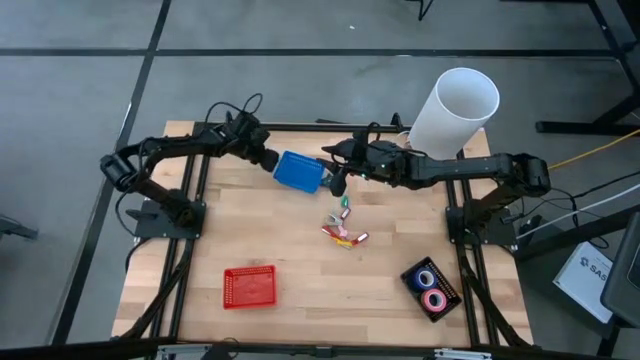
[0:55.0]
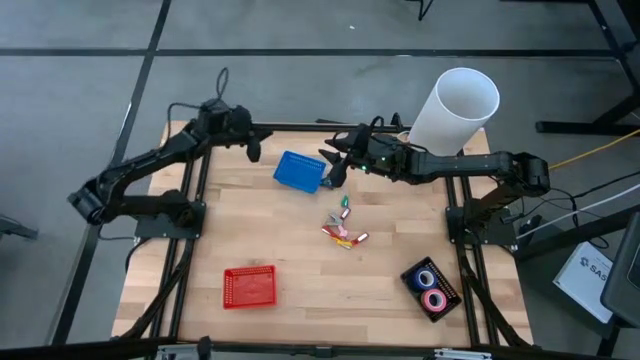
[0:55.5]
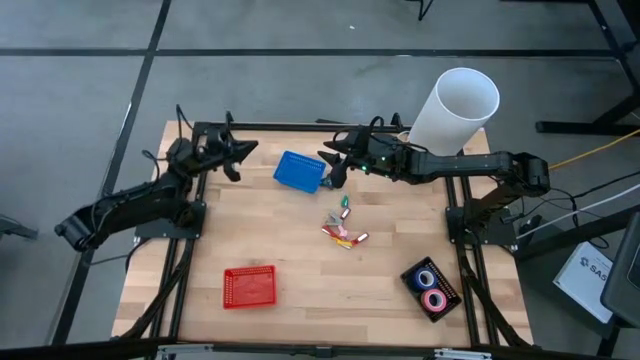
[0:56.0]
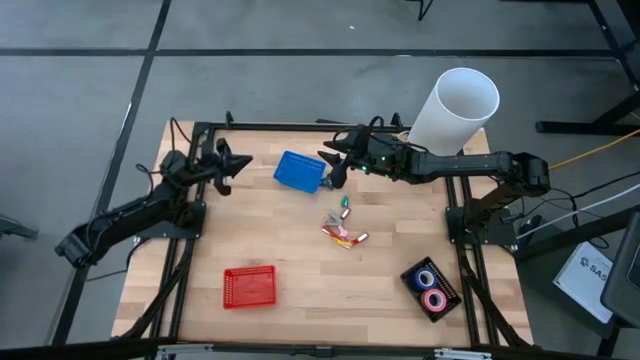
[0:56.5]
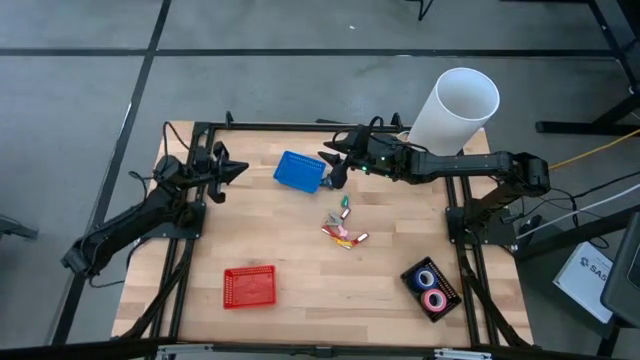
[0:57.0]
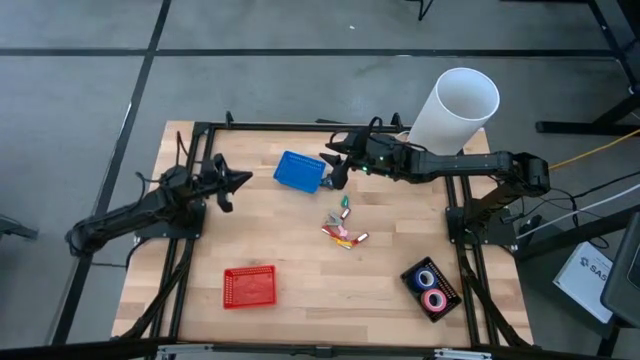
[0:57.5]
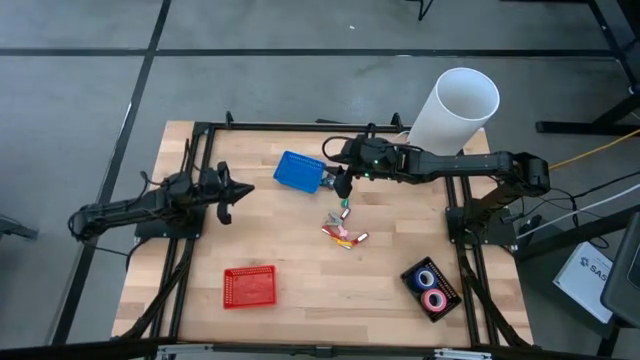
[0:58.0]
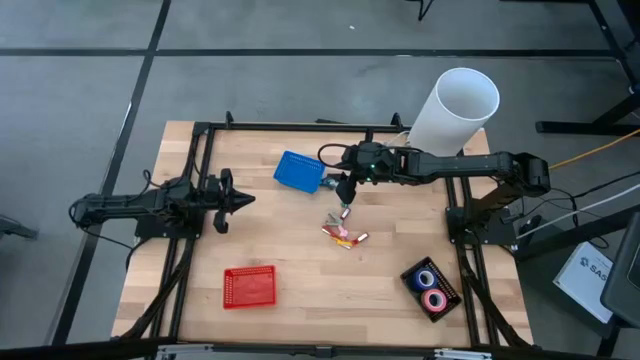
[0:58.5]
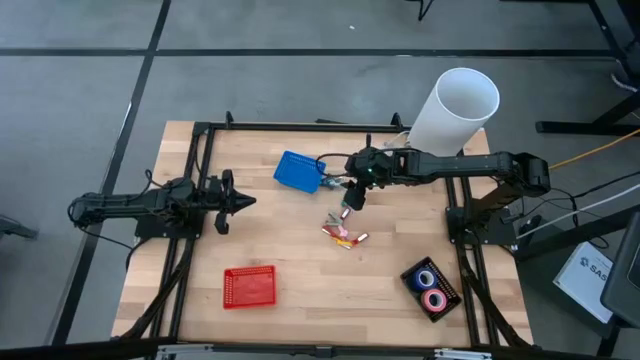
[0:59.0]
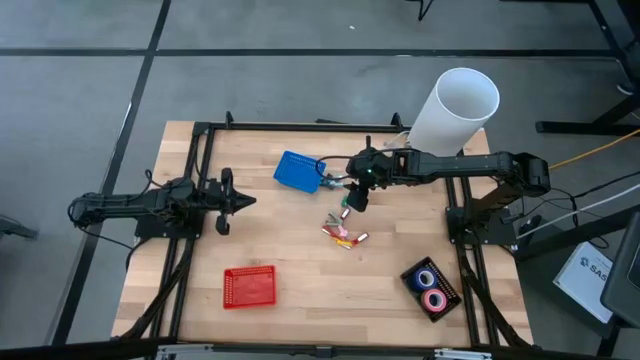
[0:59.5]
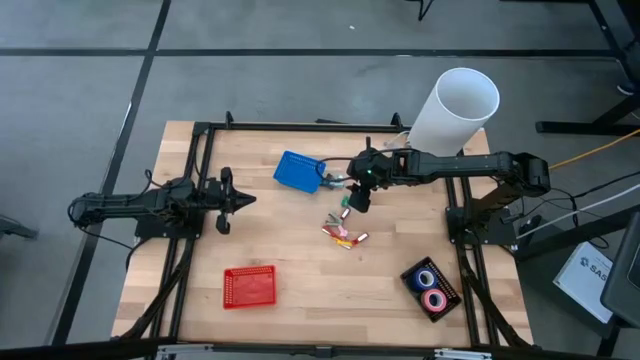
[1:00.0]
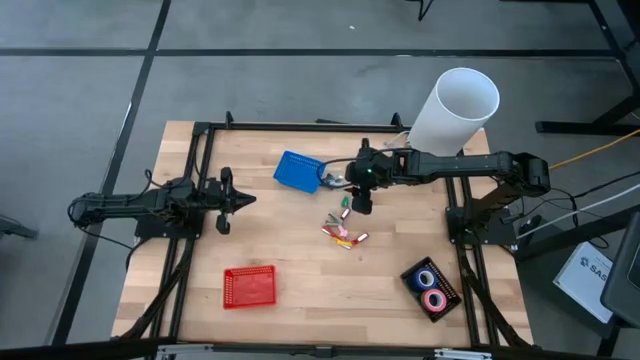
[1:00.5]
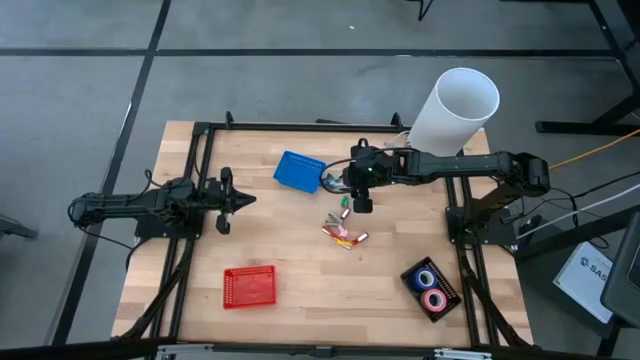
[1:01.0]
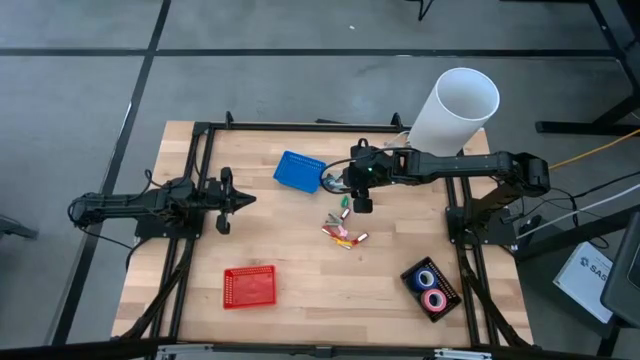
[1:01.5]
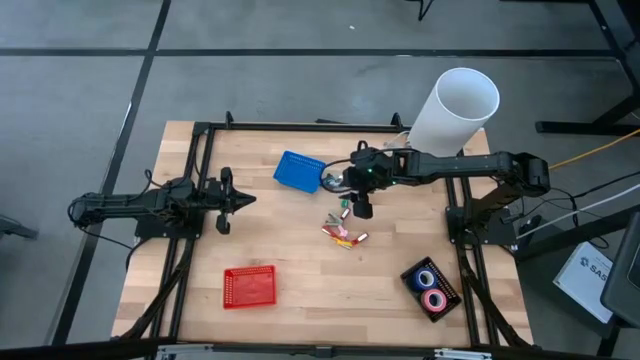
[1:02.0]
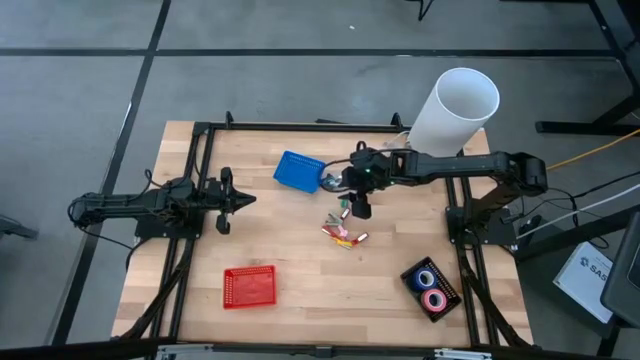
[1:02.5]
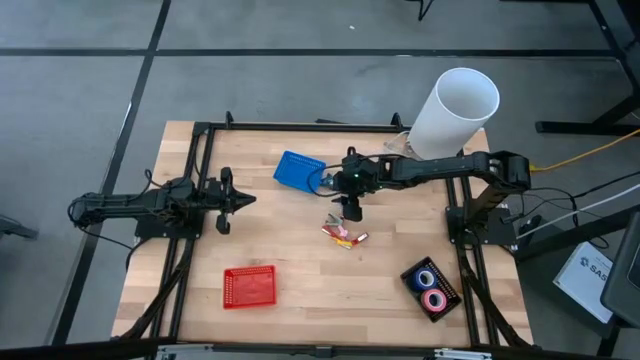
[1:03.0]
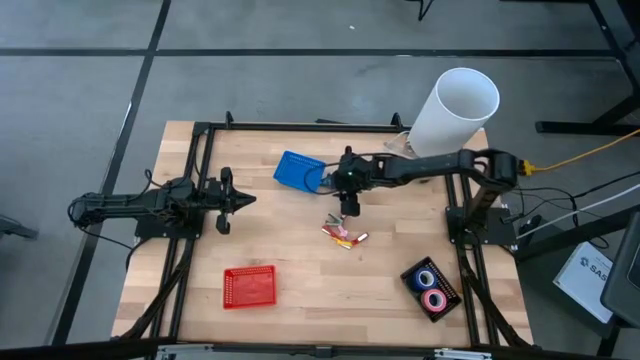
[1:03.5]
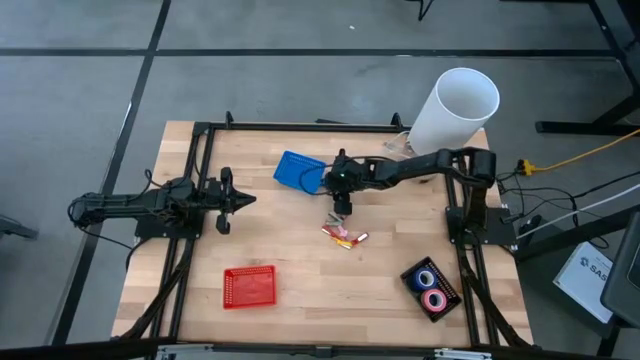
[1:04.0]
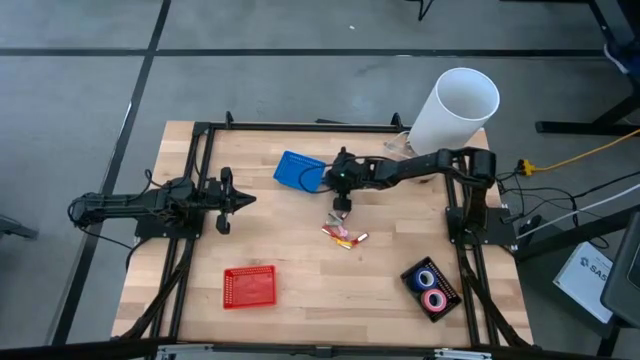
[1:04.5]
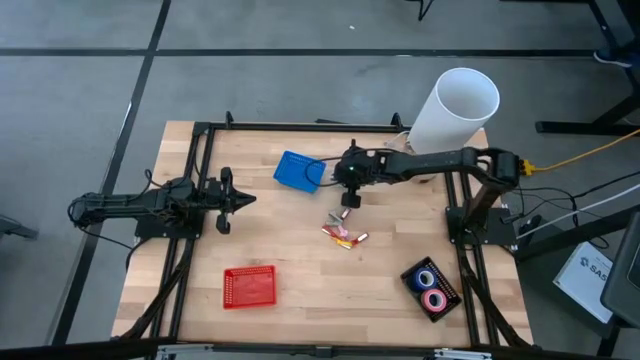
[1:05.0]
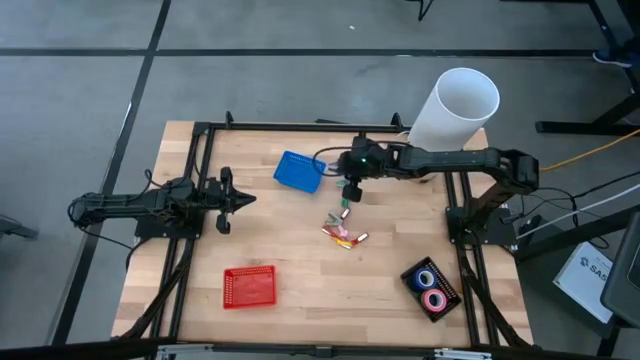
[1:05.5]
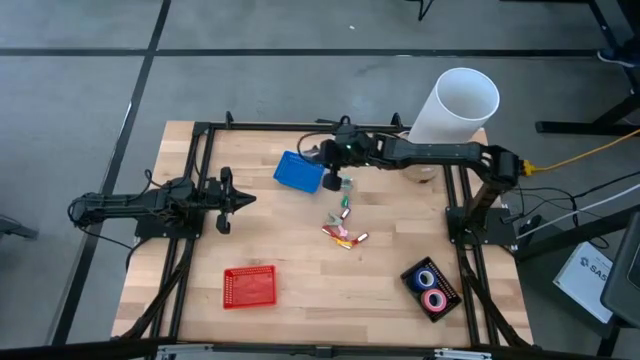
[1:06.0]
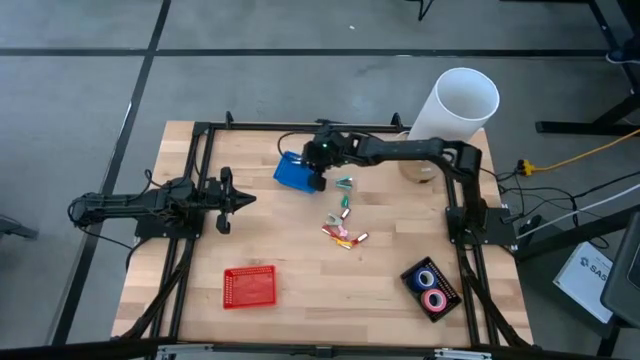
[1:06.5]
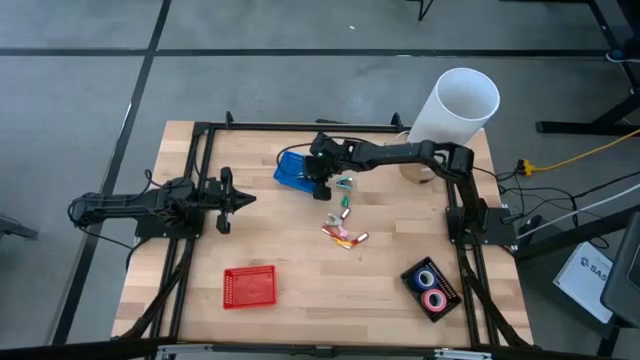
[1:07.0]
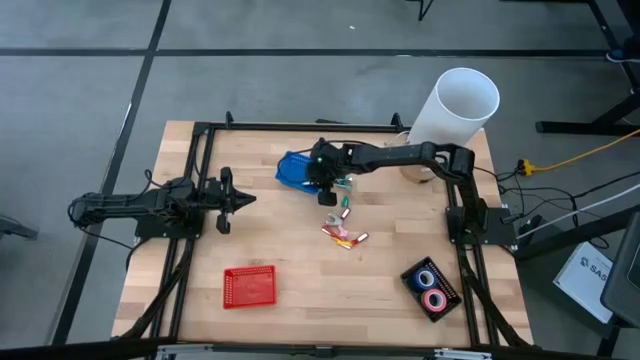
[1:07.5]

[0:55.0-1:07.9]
Task: Pick and place Stapler, Stapler remover, tape
Put the black staple remover into the blue bin

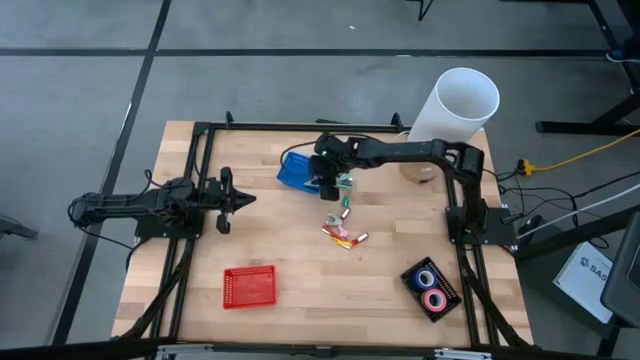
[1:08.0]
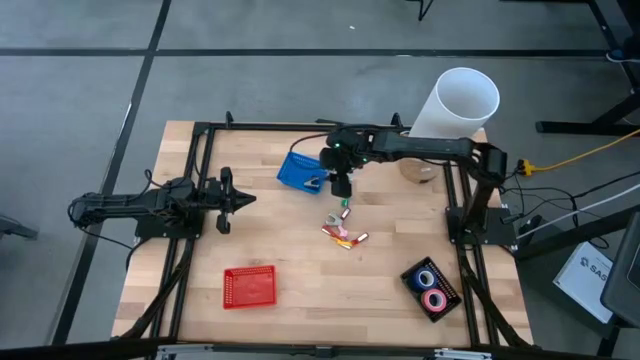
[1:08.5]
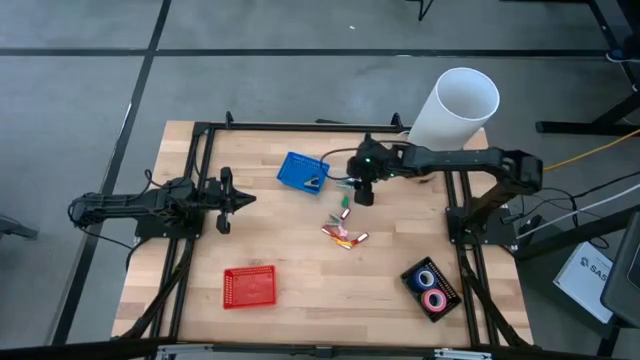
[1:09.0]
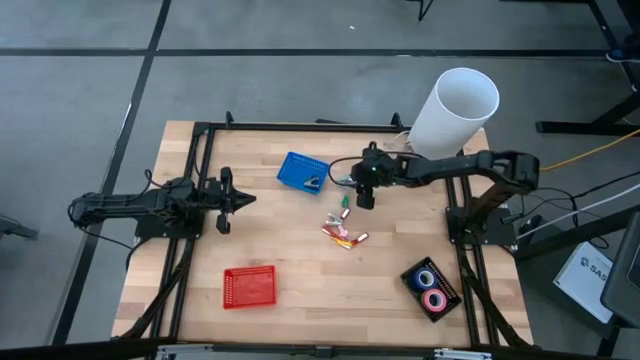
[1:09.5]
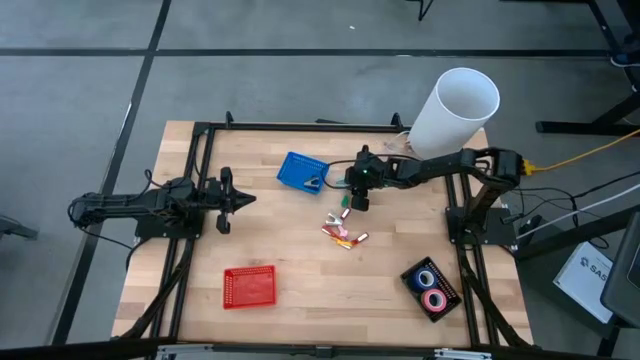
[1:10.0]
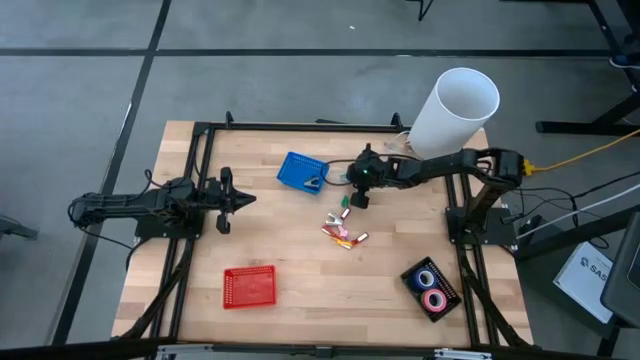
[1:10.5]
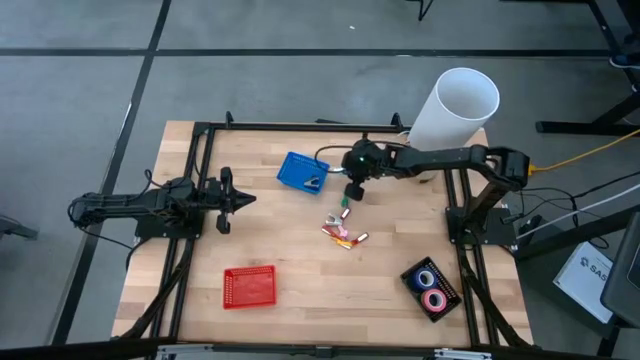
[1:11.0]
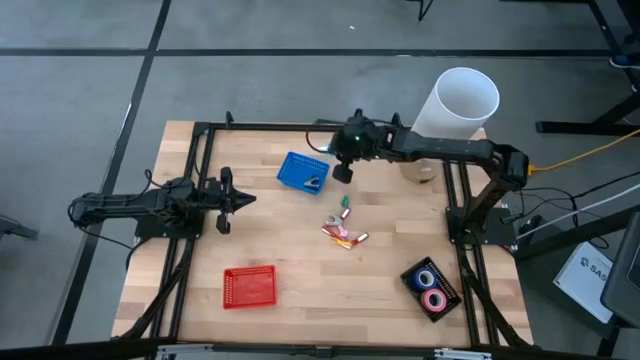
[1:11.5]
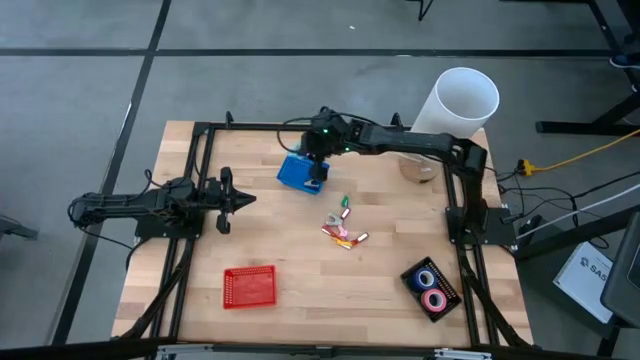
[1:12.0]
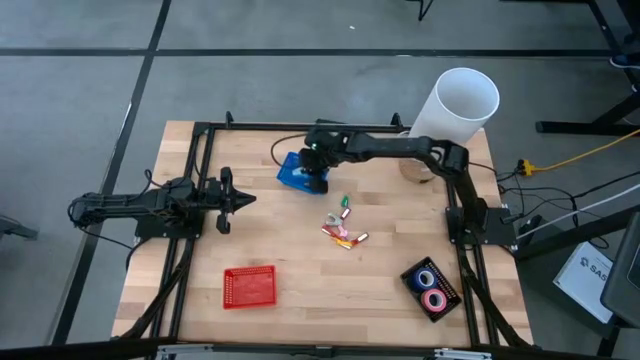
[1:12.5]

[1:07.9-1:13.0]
Put the light blue staple remover into the blue bin

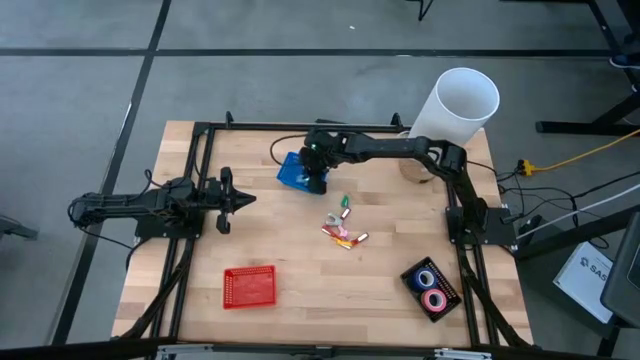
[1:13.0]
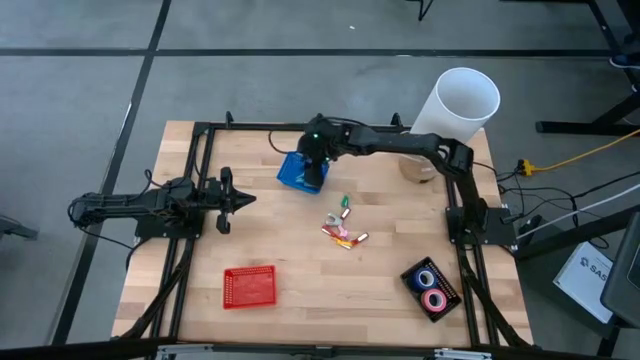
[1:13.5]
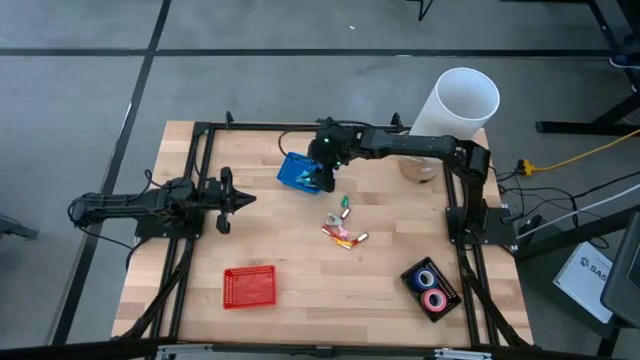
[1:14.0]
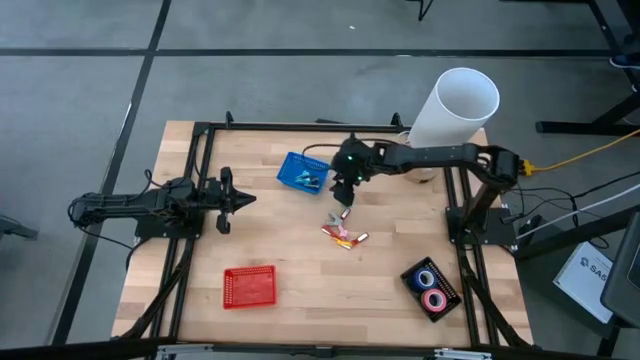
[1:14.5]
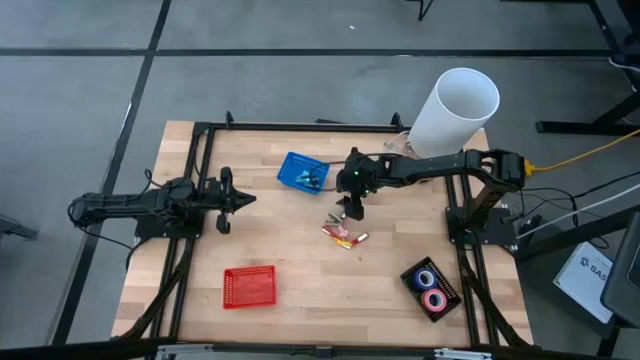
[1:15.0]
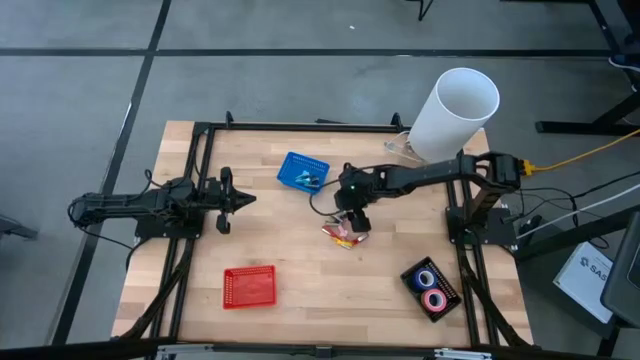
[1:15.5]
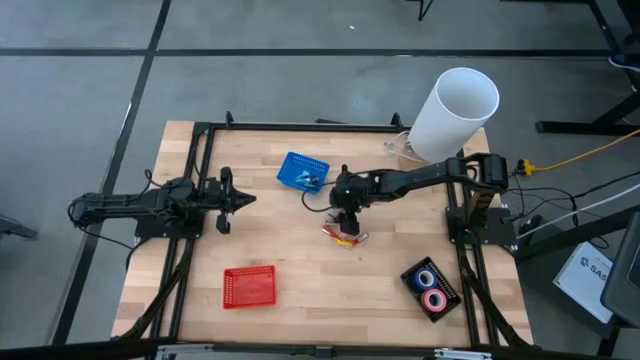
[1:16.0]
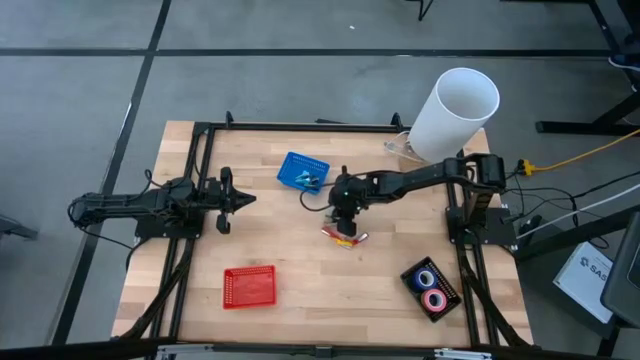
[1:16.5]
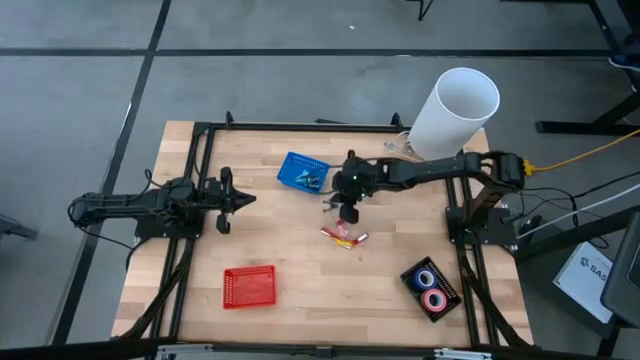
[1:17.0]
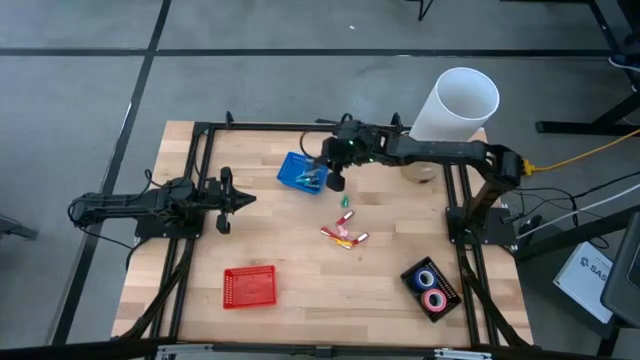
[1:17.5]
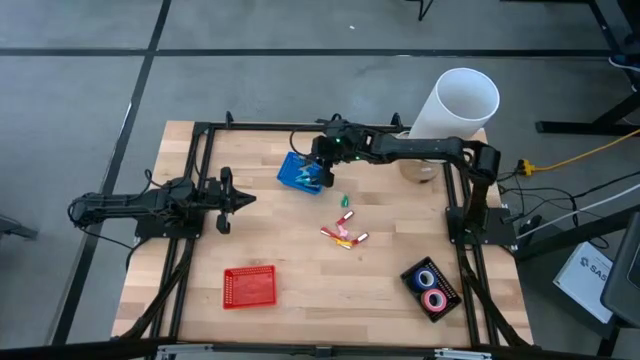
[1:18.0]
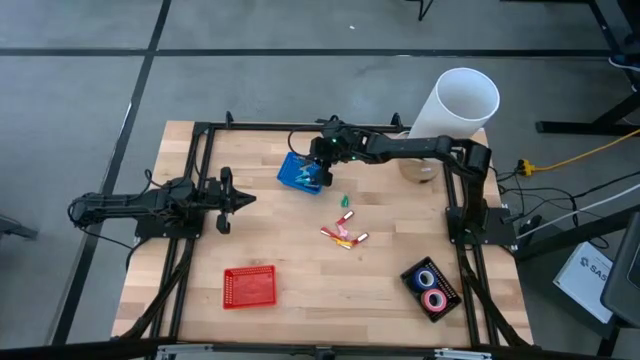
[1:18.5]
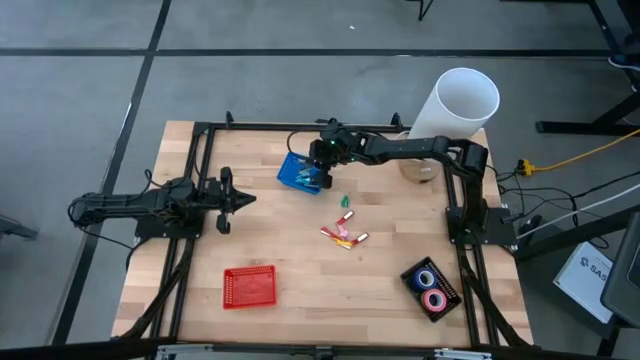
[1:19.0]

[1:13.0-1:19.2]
Put the gray staple remover into the blue bin
